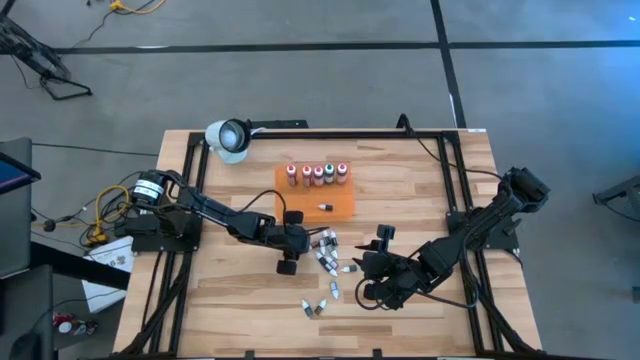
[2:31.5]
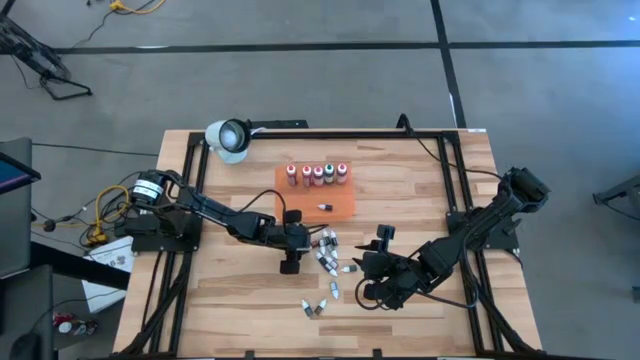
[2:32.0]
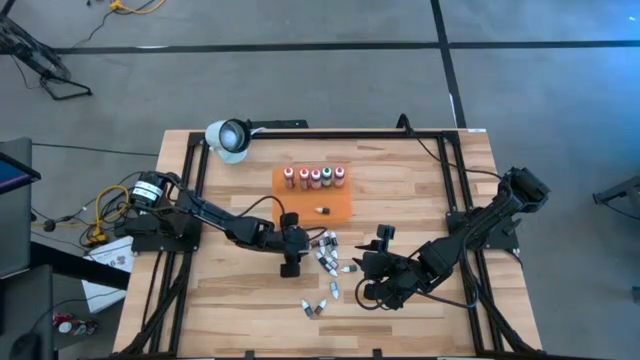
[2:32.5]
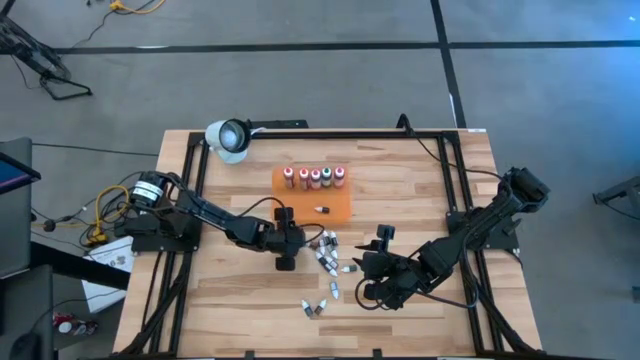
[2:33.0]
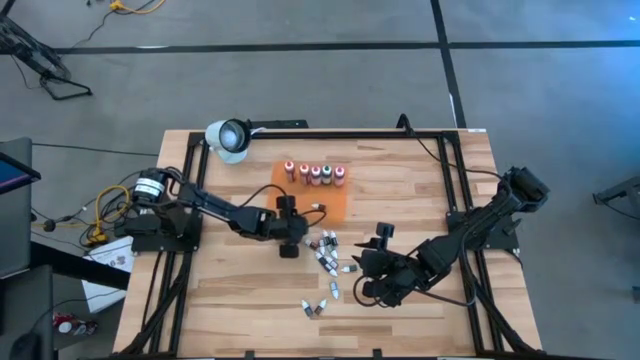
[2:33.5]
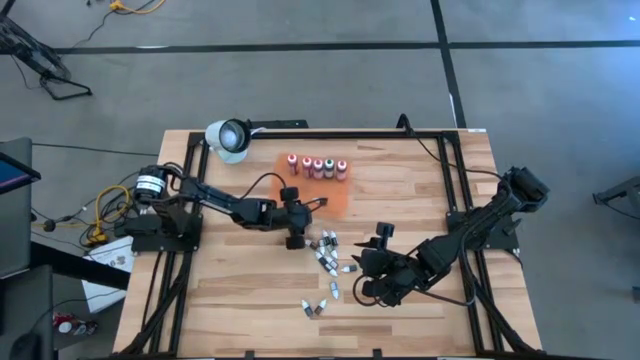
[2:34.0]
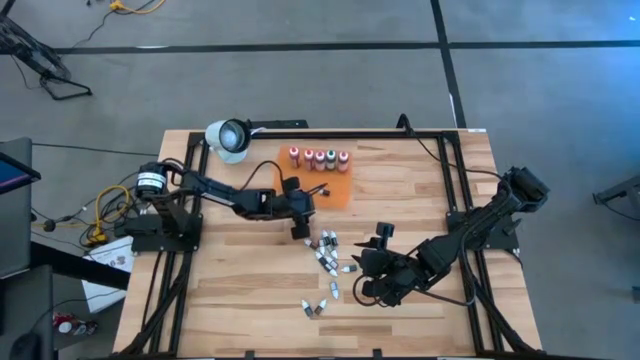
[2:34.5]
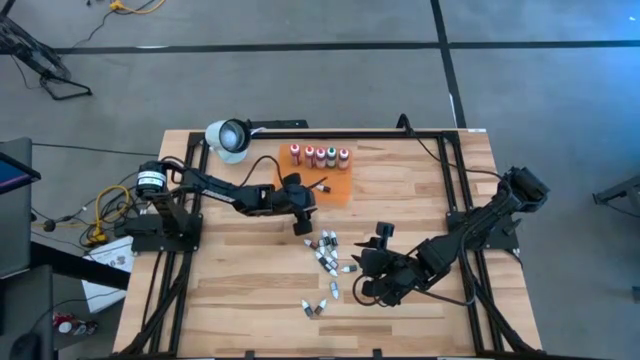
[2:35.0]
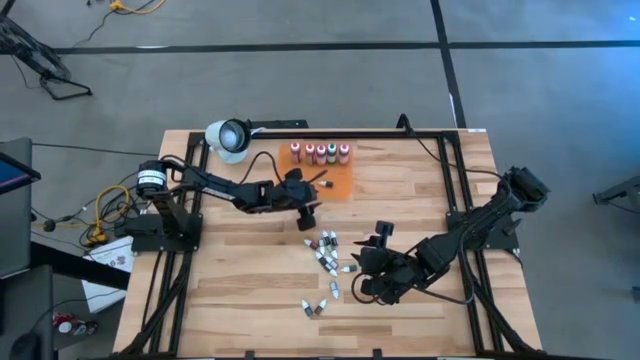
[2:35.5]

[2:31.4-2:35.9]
Task: Pick & Place food coloring
Adjust the orange bin

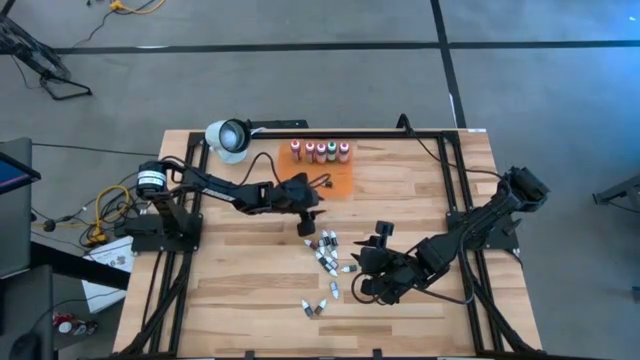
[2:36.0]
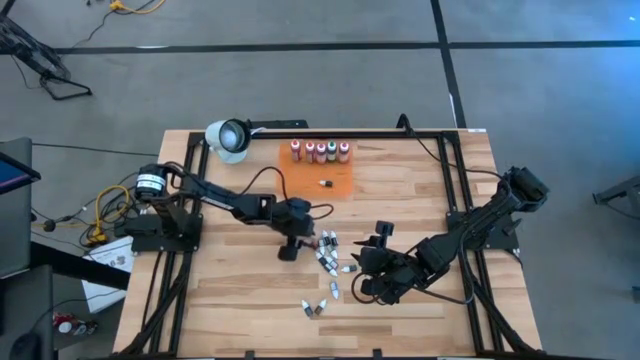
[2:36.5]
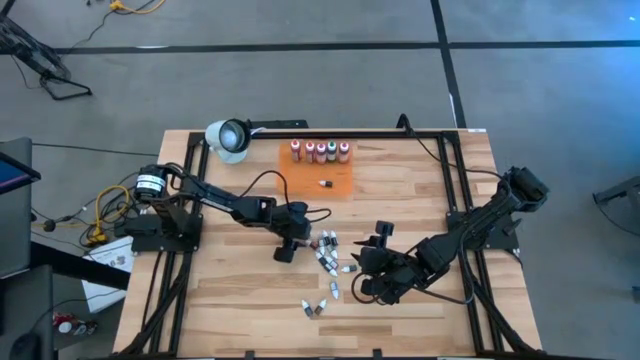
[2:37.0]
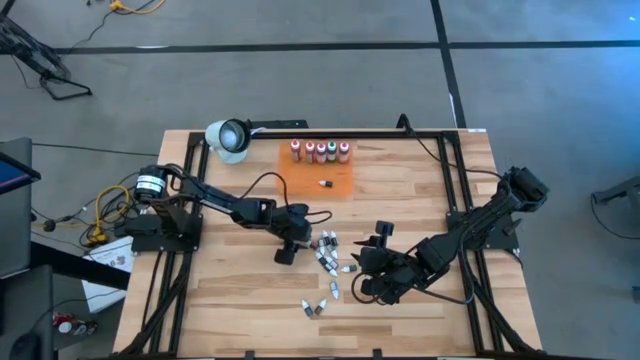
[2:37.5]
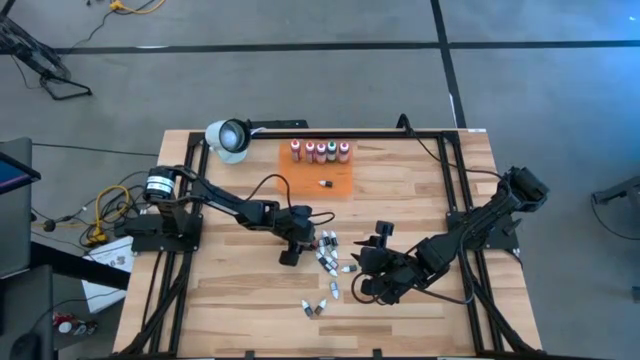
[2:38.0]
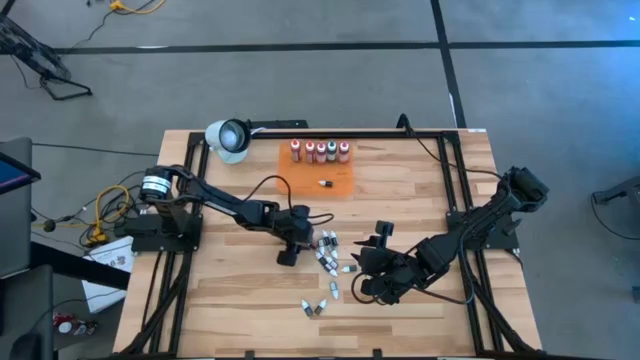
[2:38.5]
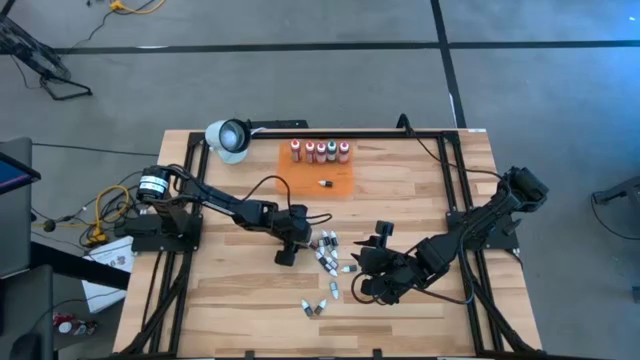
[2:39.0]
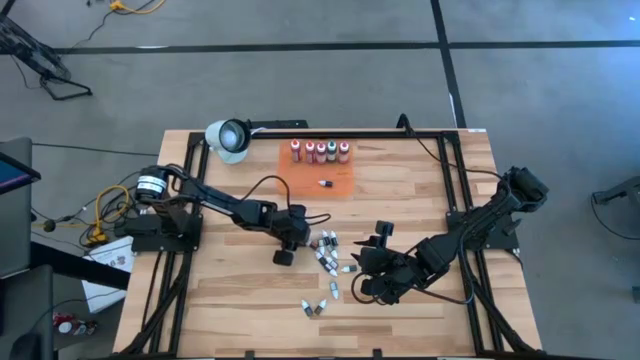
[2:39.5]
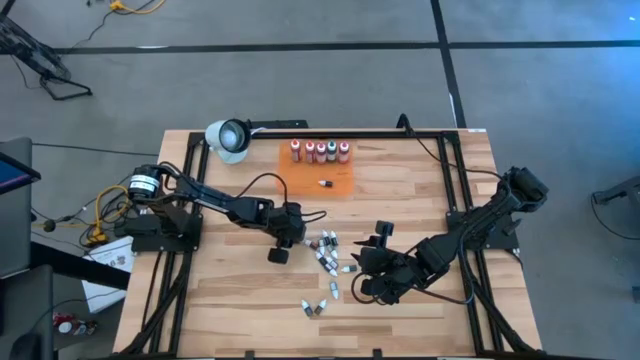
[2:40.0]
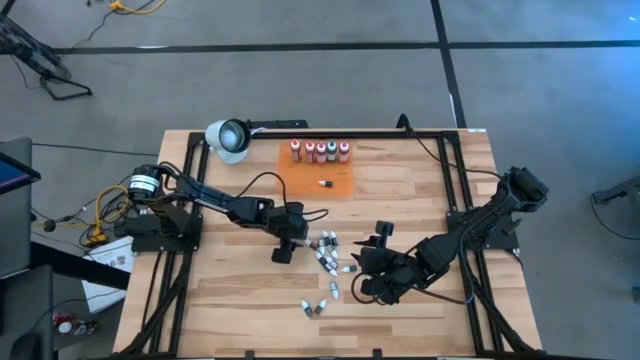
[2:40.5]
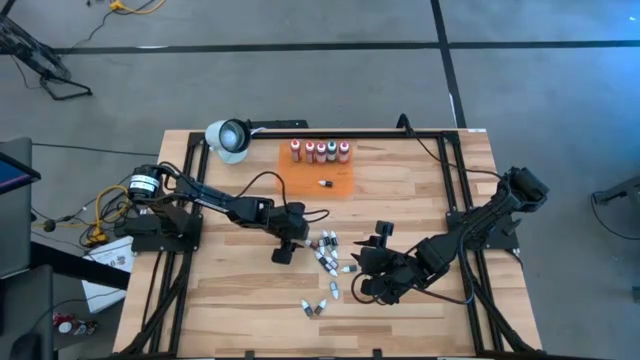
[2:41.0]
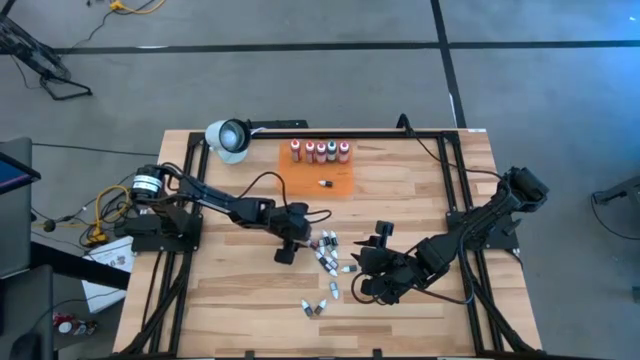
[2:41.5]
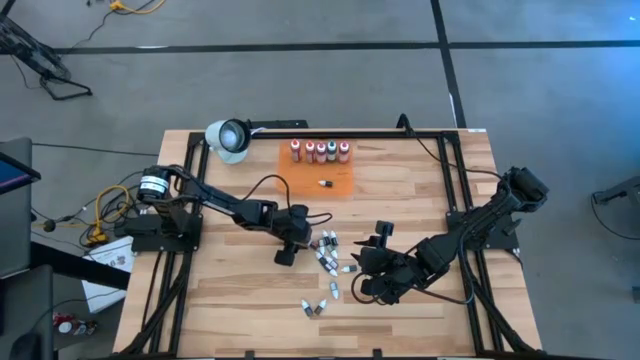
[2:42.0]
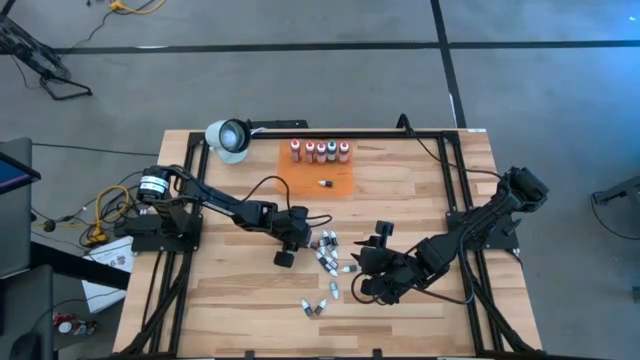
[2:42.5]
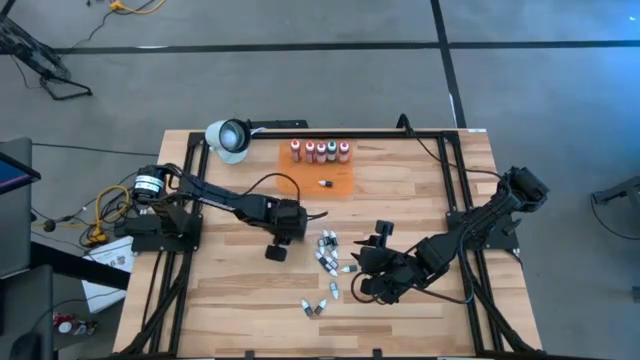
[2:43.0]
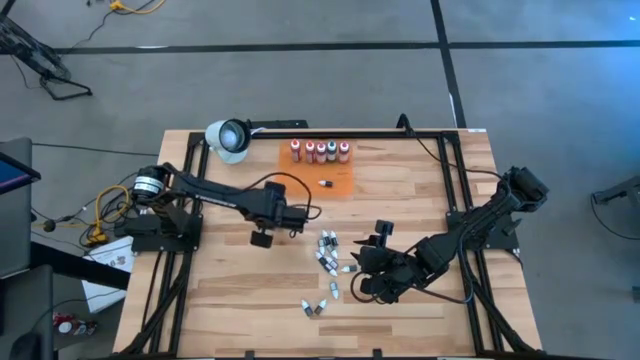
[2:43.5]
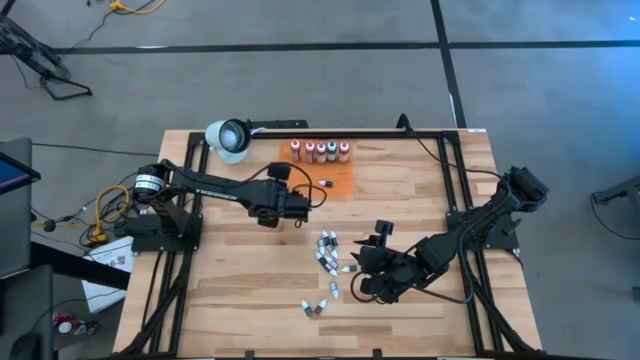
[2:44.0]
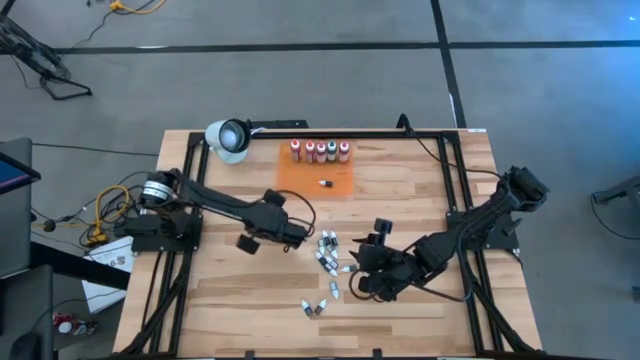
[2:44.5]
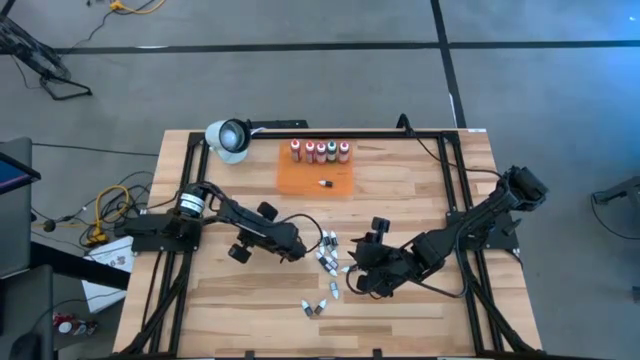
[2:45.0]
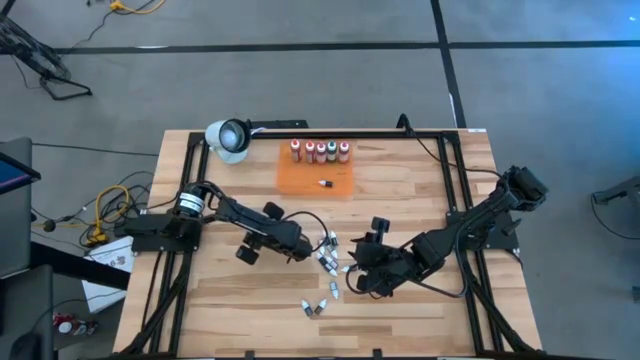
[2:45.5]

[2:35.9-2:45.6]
Put the small red food coloring bottle into the orange bin

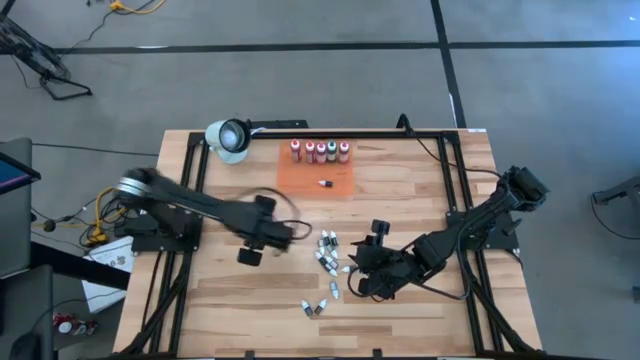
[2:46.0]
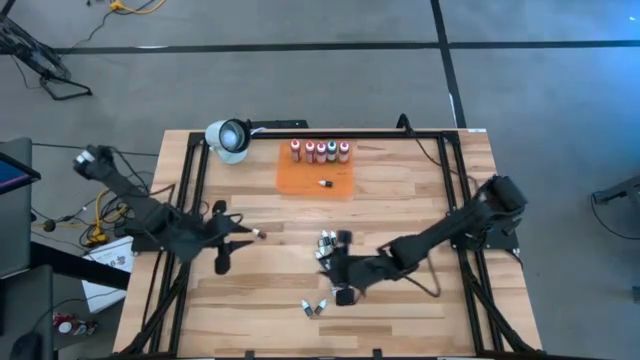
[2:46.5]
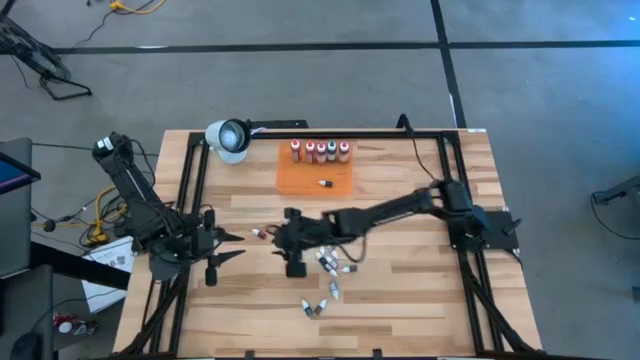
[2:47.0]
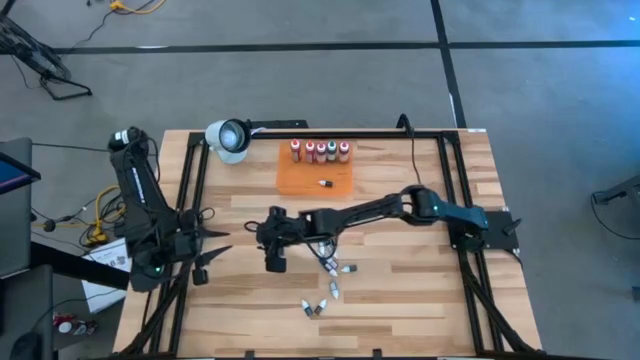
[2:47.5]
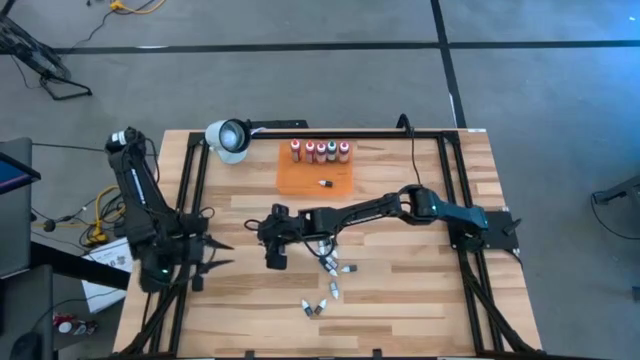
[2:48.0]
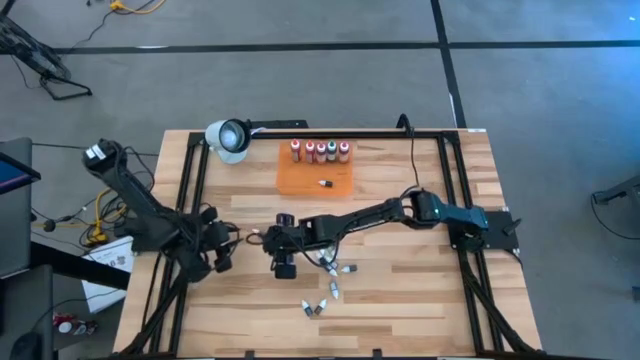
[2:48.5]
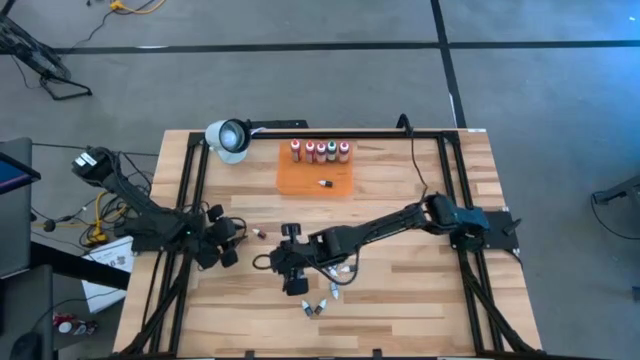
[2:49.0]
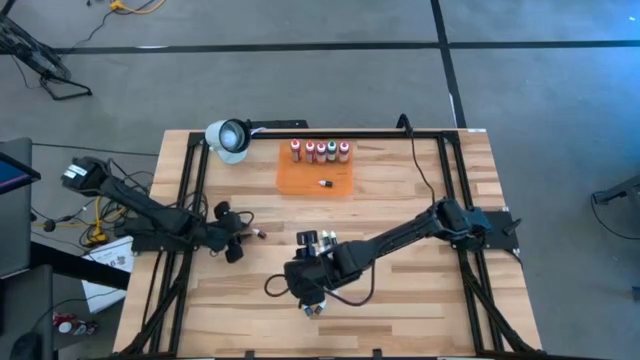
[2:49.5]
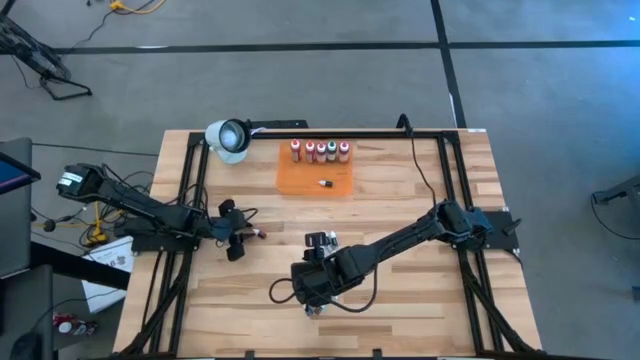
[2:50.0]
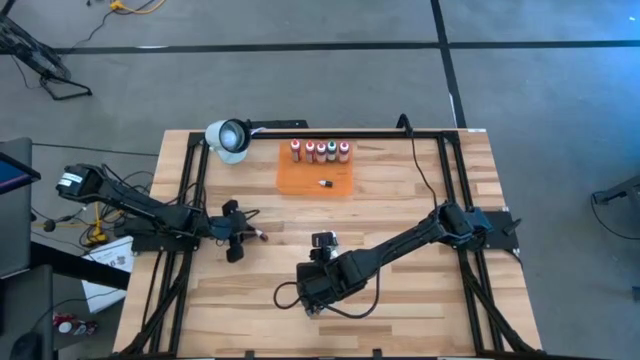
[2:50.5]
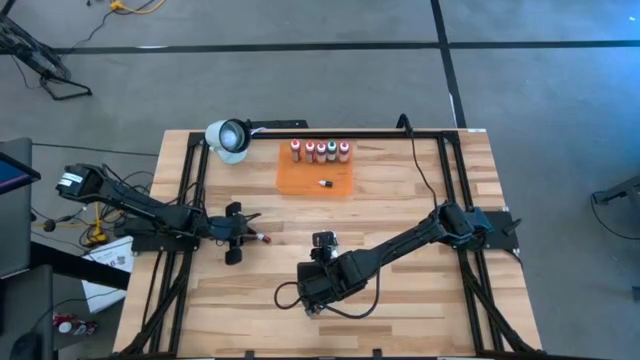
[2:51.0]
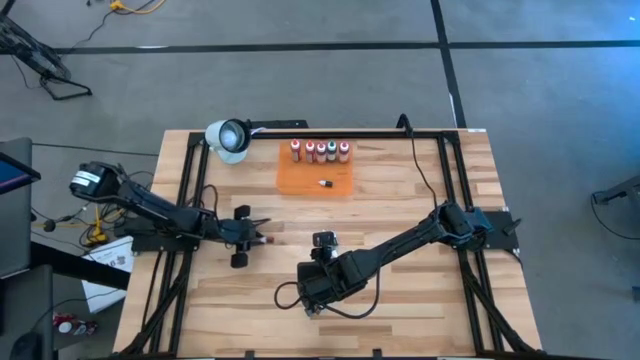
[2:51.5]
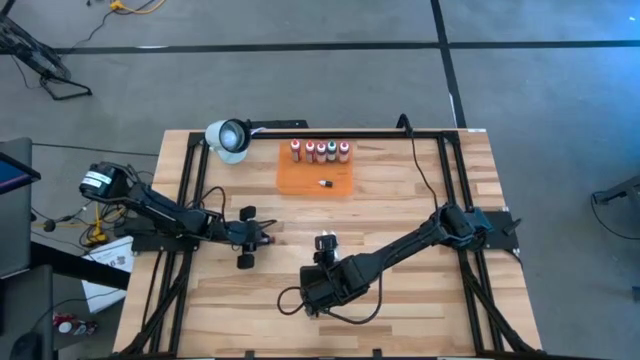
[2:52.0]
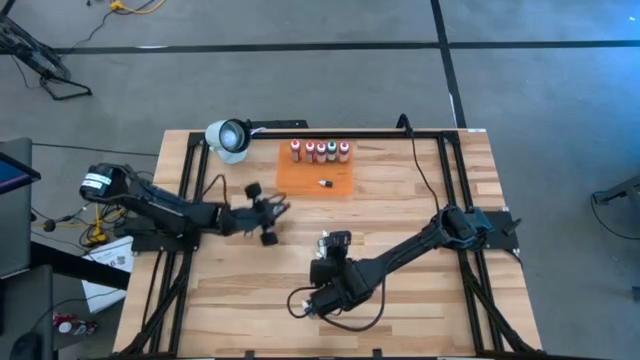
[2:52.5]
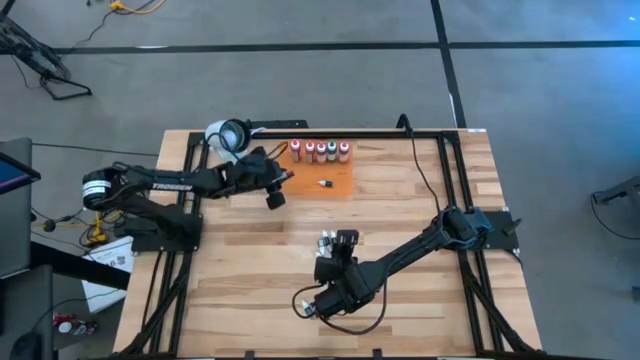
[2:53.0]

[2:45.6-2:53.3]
Put the small red food coloring bottle into the orange bin
